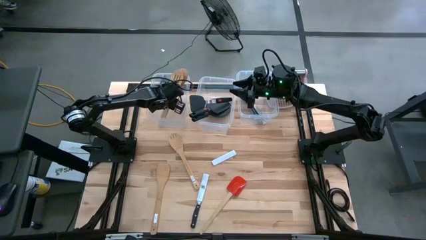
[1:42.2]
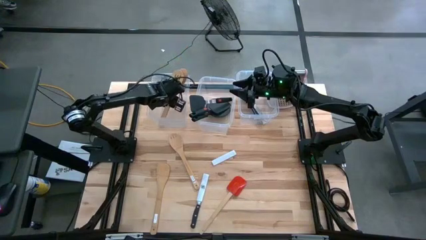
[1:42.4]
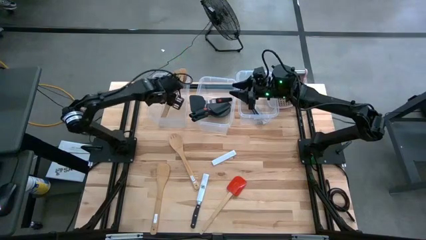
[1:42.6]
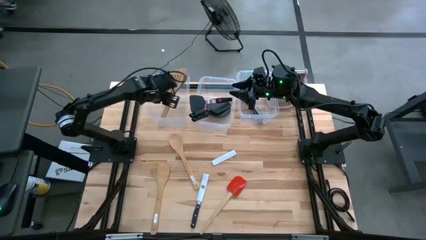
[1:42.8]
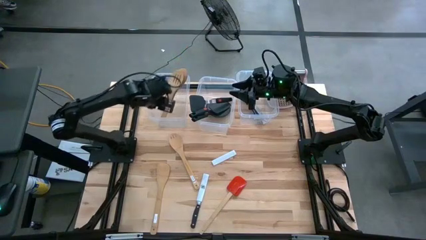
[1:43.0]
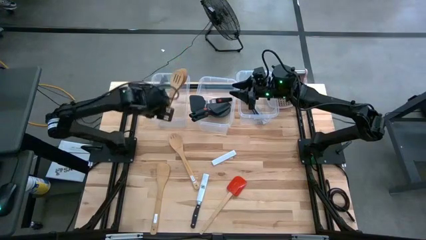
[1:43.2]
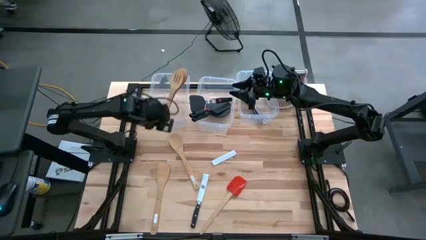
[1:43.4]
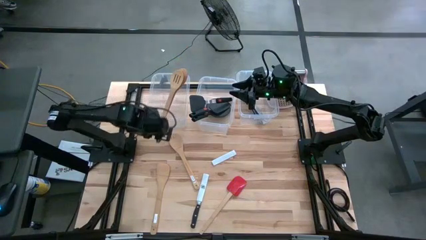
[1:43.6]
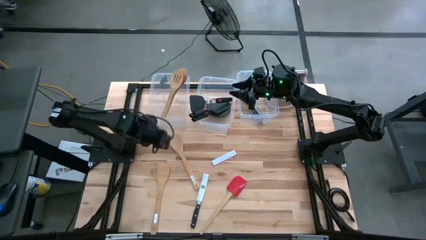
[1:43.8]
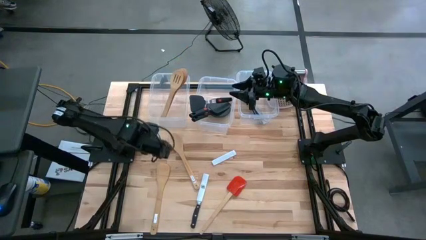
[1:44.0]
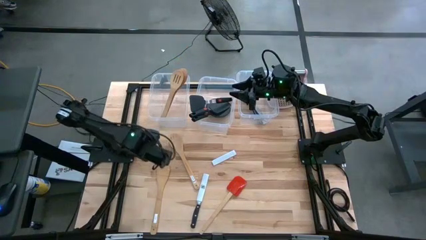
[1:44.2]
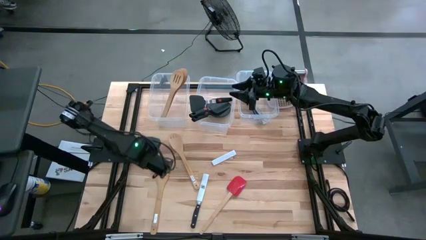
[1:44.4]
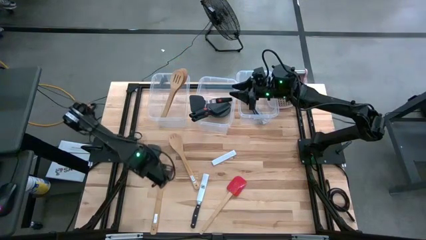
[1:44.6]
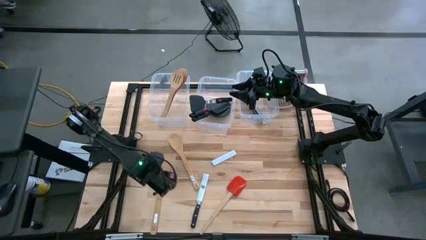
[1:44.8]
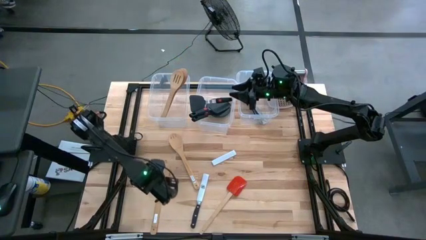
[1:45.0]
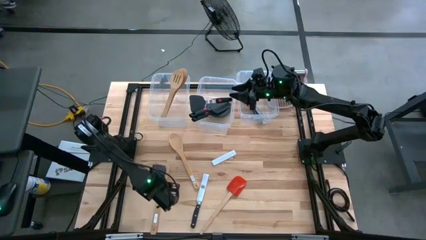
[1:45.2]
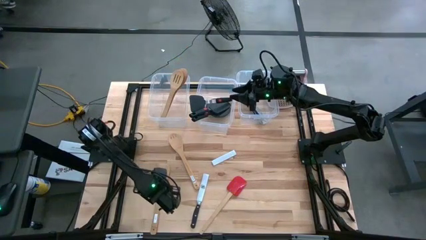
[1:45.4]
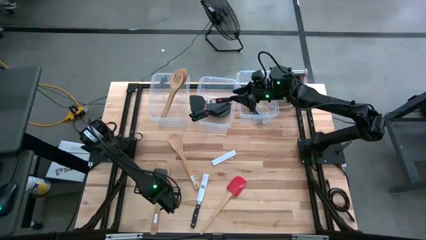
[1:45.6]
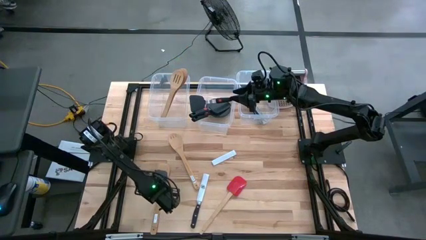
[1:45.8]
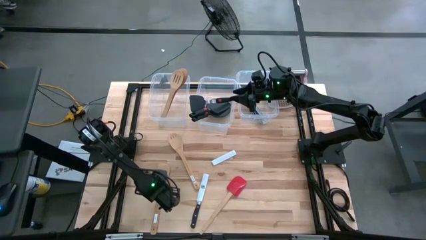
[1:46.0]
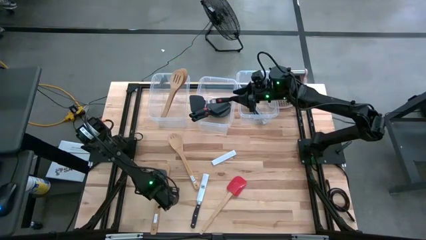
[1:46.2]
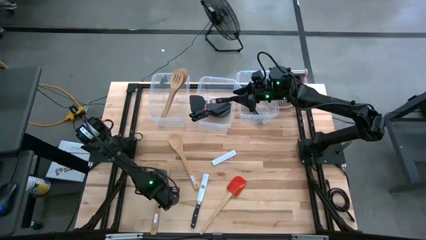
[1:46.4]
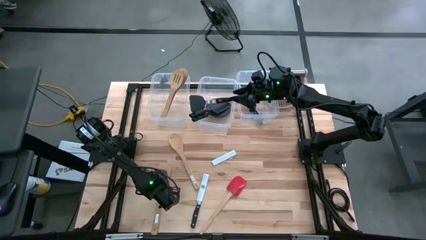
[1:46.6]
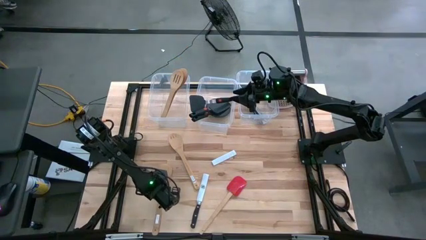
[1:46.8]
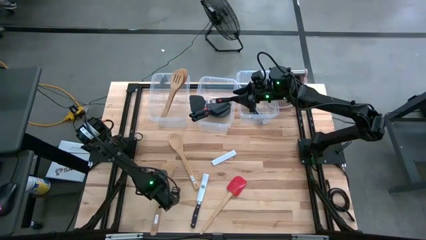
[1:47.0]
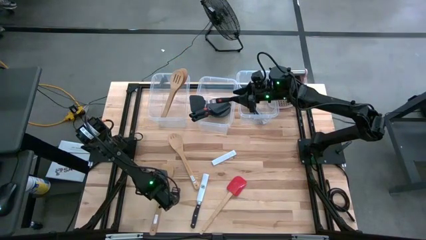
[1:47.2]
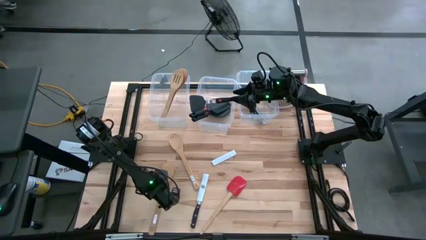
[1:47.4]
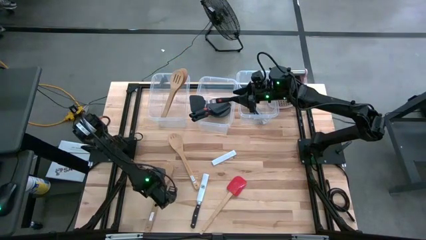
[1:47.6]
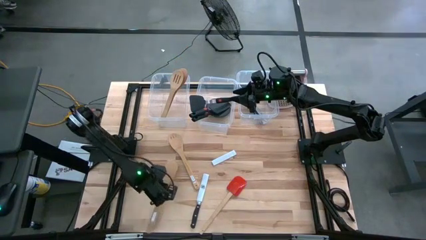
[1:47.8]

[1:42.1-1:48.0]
Task: Pick & Place Kitchen Items
Put the wooden serving spoon into the left bin

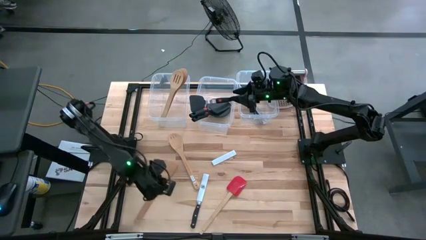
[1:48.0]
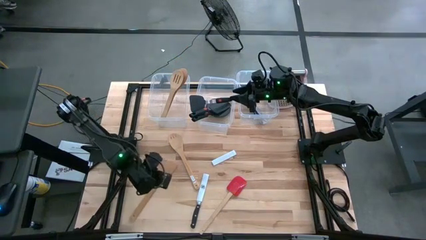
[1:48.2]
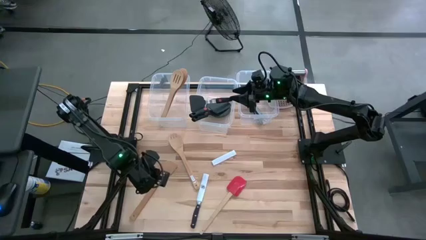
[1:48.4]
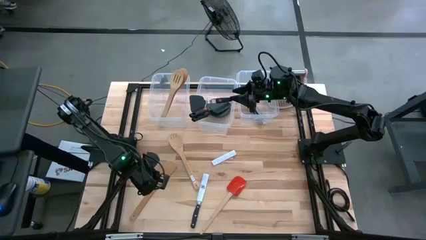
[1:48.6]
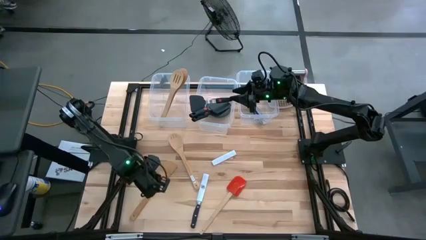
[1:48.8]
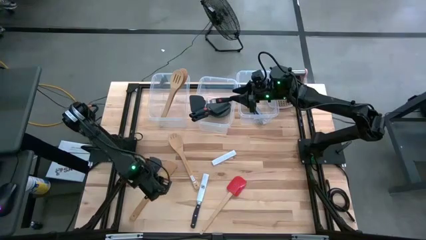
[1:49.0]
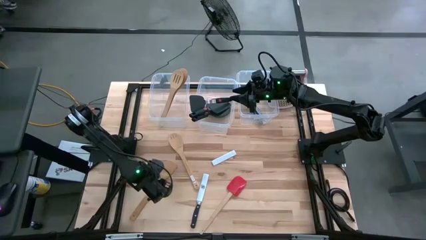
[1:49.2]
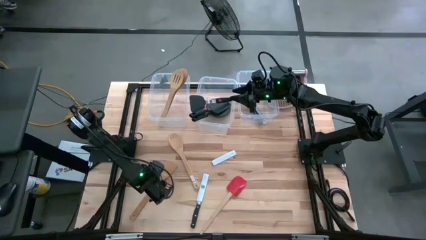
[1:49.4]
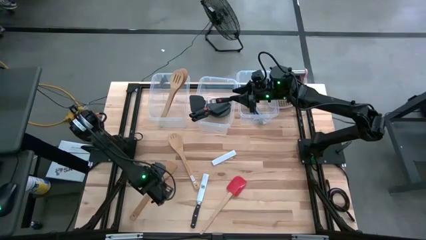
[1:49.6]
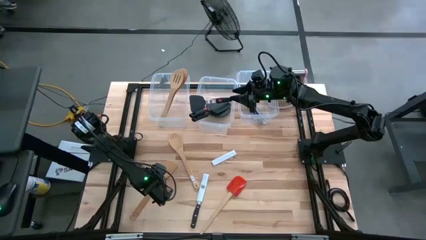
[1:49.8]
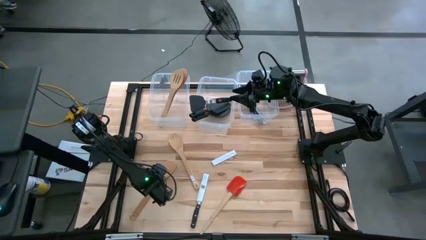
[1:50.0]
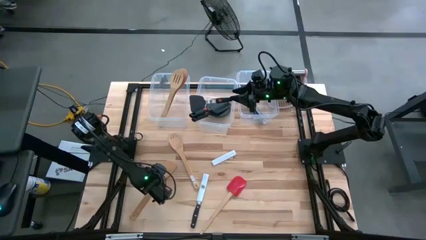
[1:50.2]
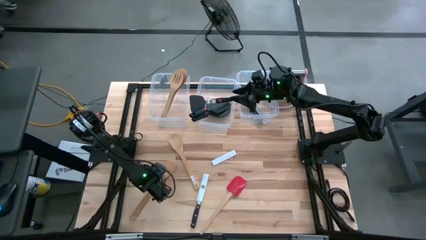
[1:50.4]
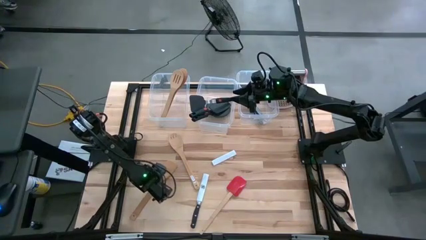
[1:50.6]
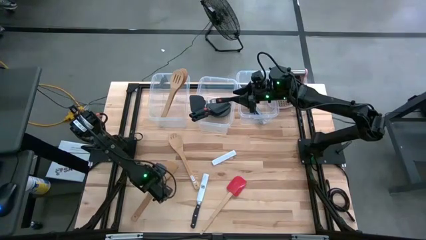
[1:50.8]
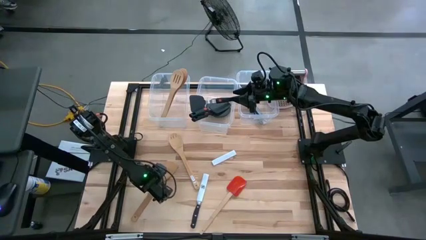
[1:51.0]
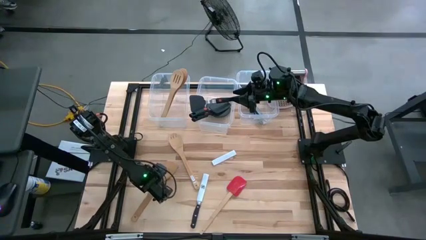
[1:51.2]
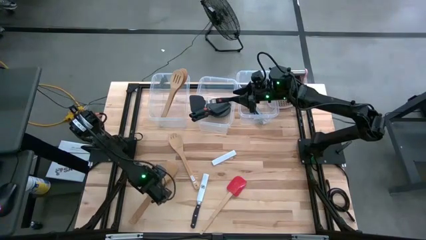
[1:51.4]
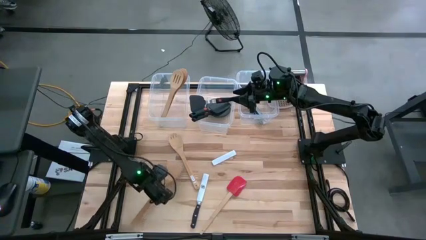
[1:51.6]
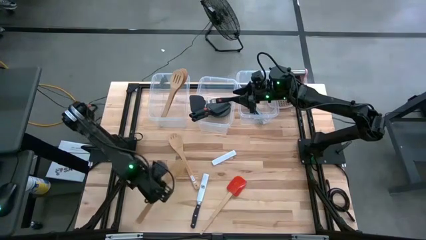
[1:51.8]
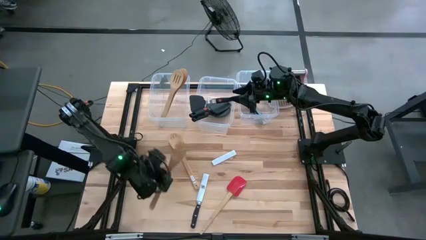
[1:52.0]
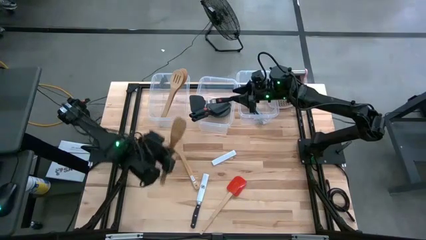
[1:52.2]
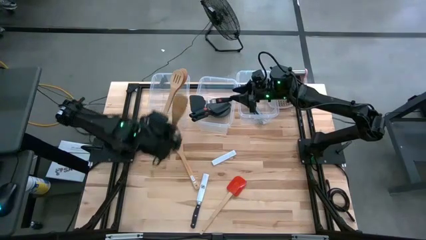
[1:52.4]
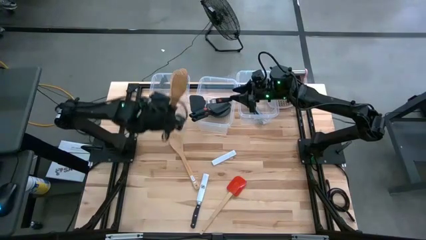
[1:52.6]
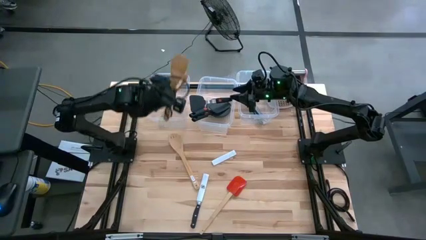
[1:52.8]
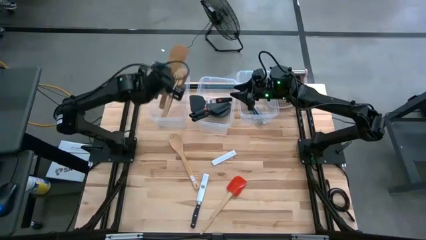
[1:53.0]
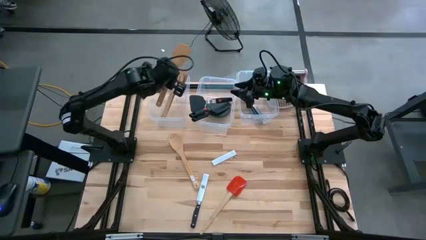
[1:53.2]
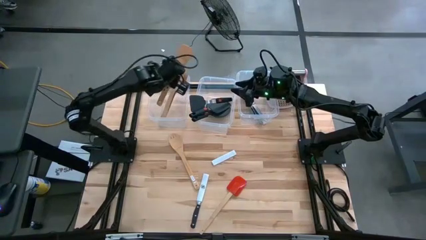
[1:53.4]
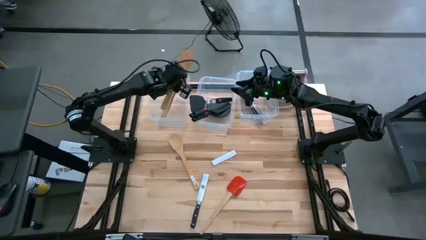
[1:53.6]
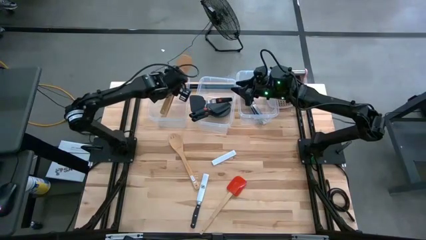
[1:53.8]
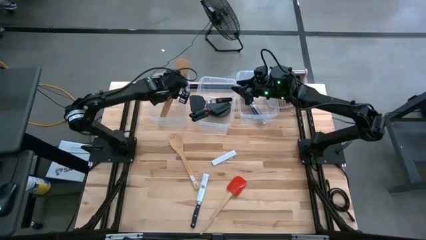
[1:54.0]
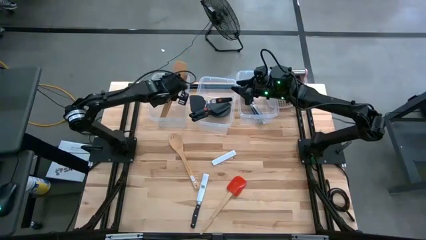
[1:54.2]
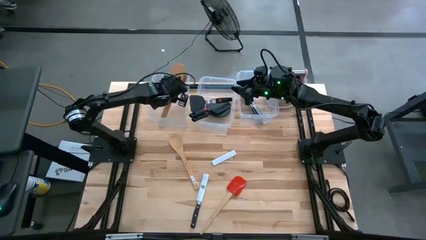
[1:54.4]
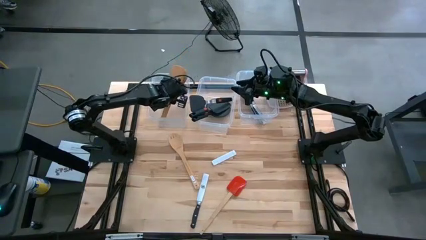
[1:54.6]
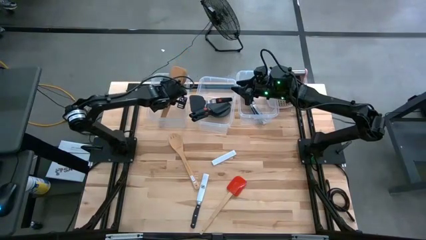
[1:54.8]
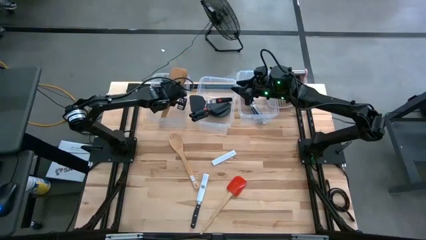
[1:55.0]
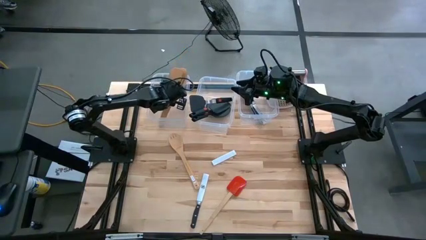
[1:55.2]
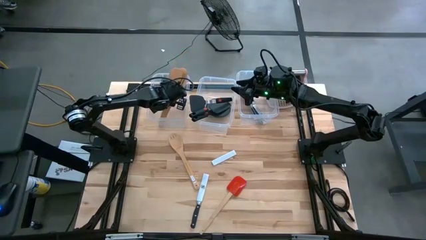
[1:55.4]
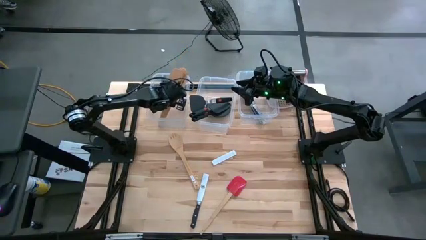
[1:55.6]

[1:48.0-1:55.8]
Put the wooden serving spoon into the left bin
